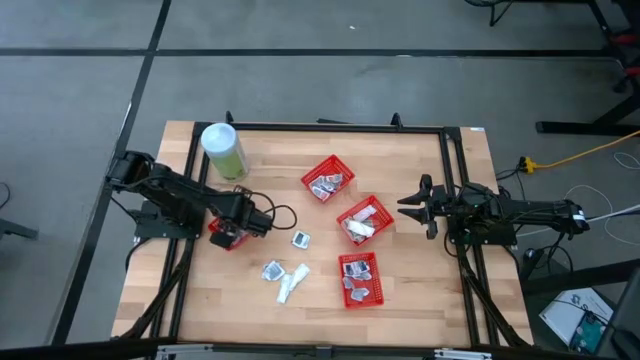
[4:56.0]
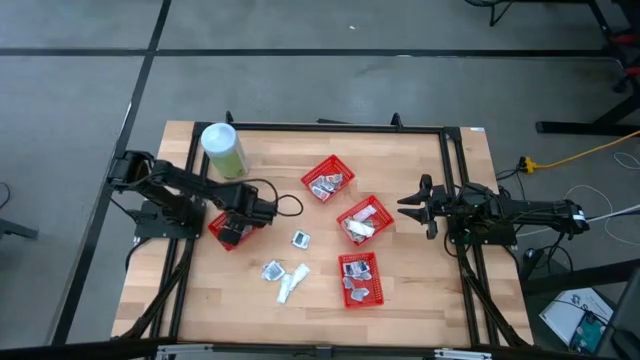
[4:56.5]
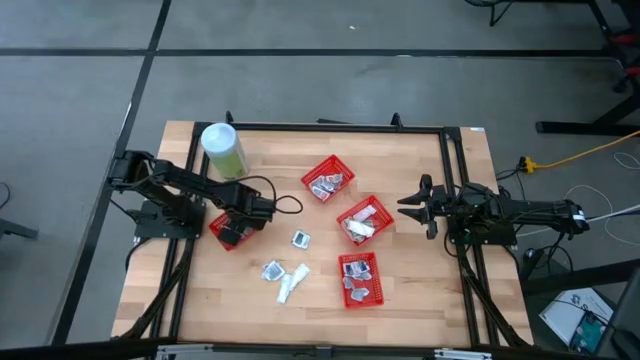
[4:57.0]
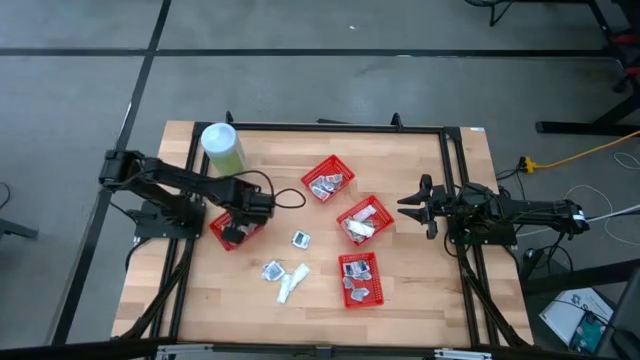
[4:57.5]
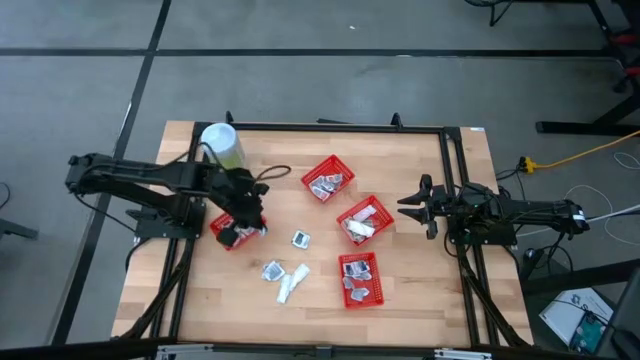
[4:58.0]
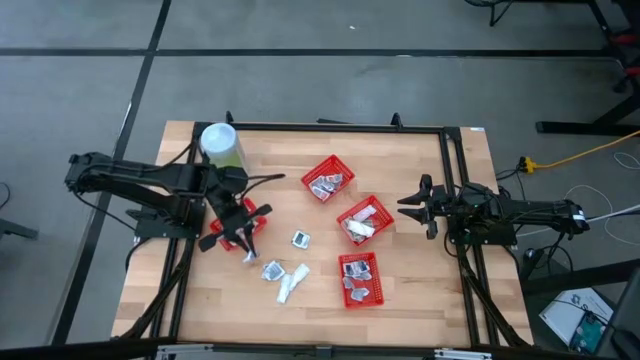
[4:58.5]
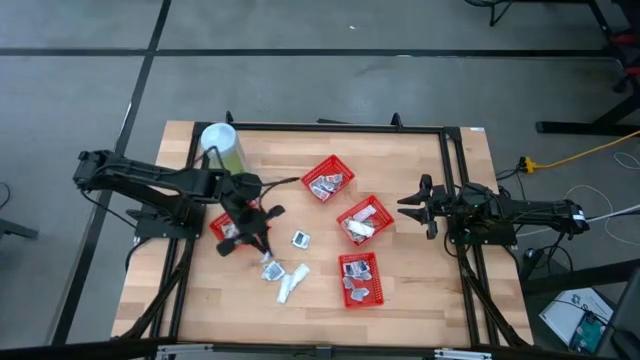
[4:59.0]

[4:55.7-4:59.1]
Task: Pick & Place First Aid Supplies
Remove the blue alcohol pad from the red container

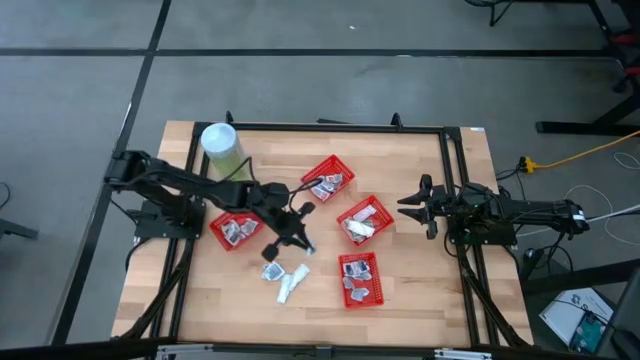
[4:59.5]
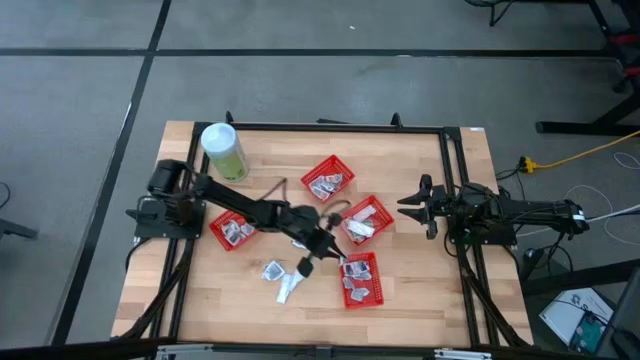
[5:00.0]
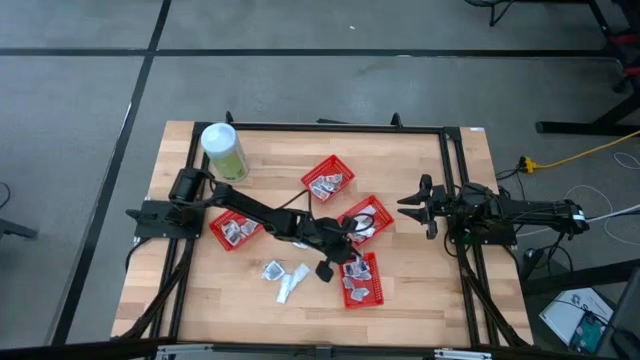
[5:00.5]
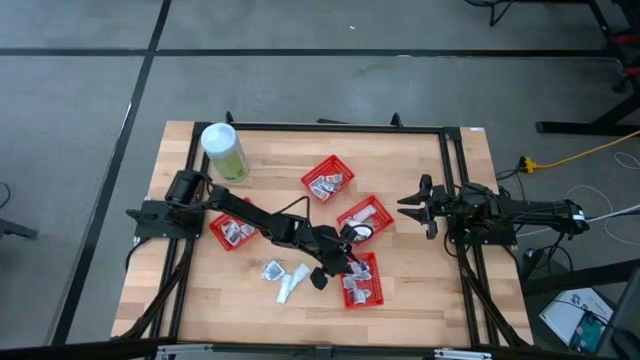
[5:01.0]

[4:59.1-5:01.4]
Put the blue alcohol pad into the red container

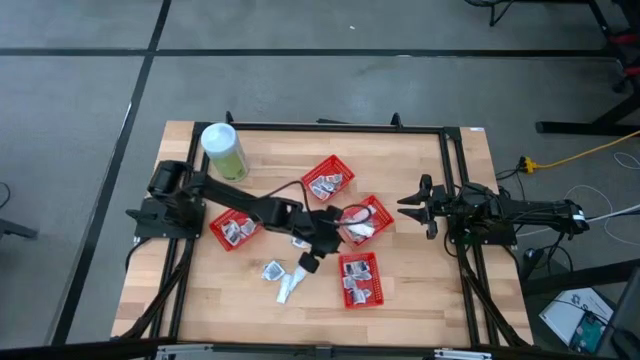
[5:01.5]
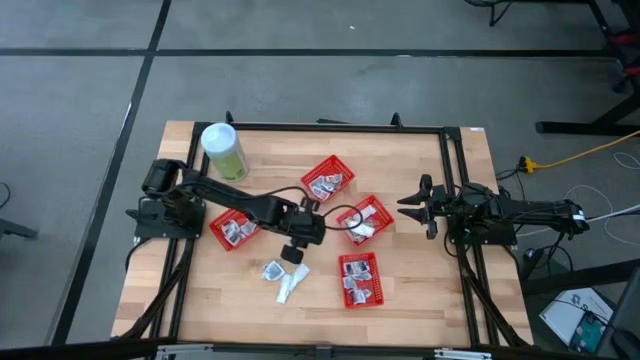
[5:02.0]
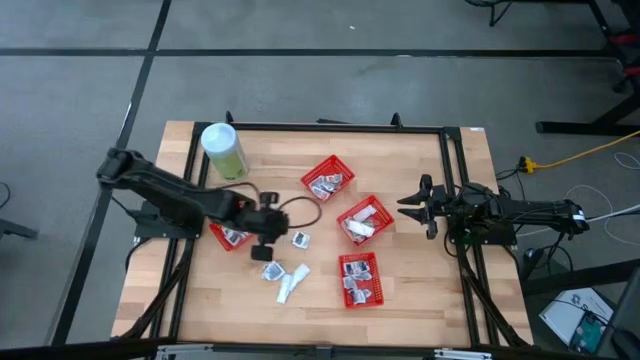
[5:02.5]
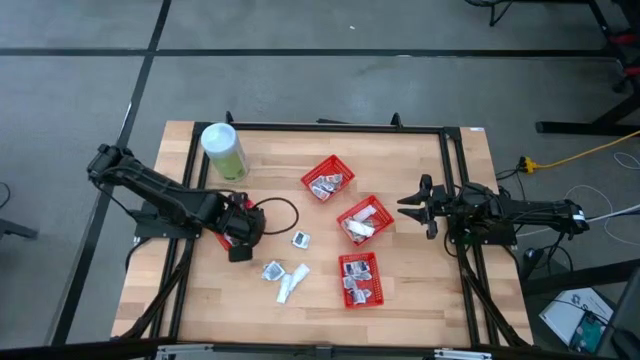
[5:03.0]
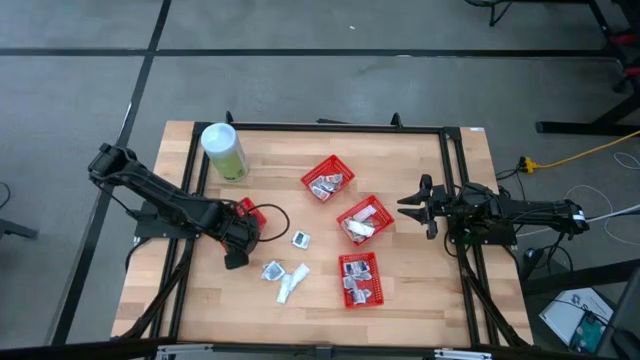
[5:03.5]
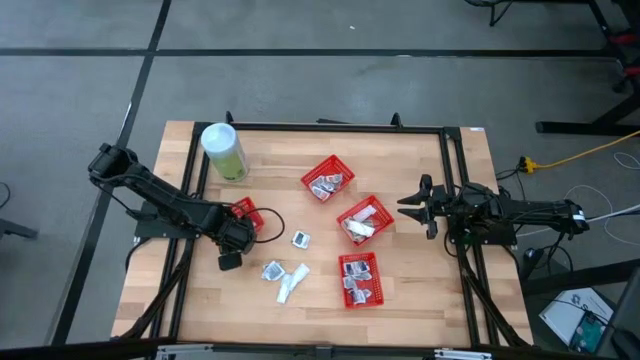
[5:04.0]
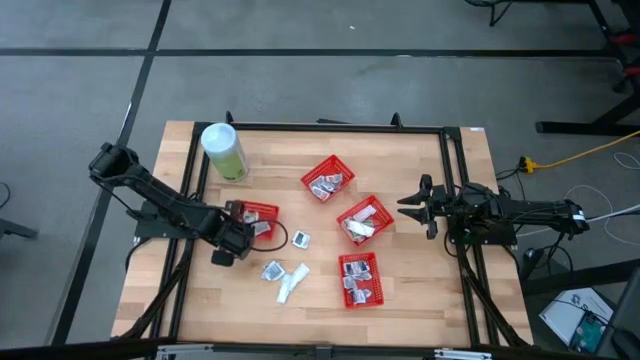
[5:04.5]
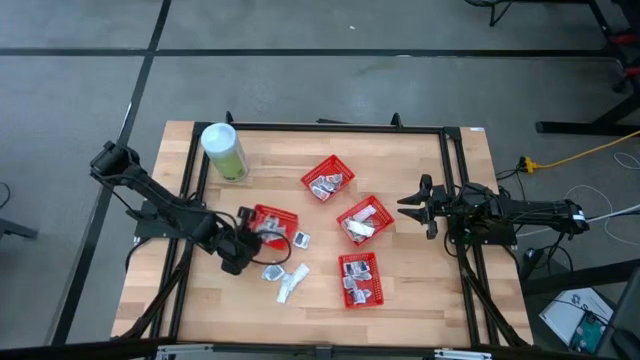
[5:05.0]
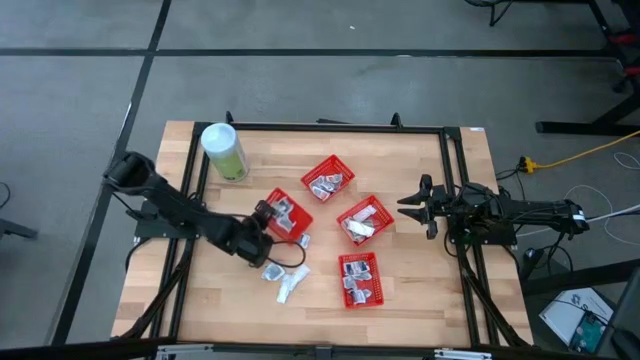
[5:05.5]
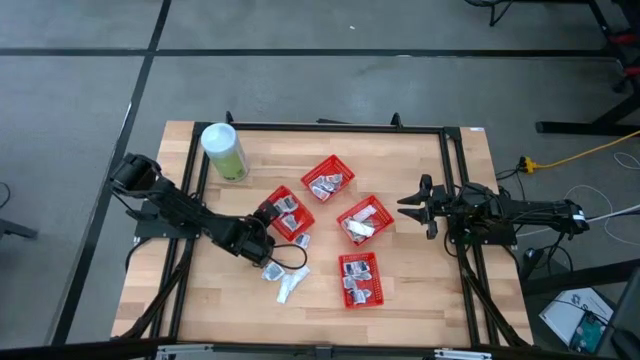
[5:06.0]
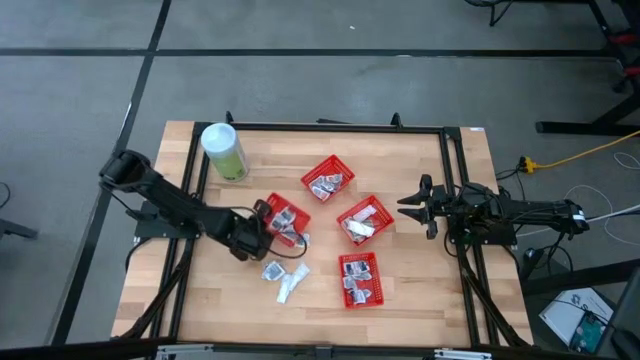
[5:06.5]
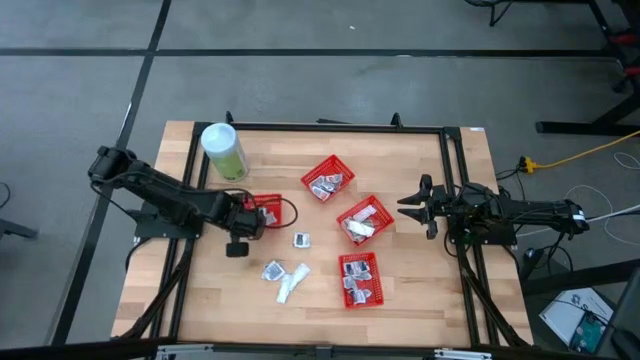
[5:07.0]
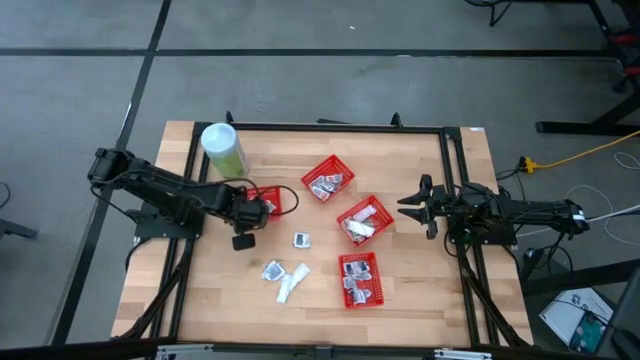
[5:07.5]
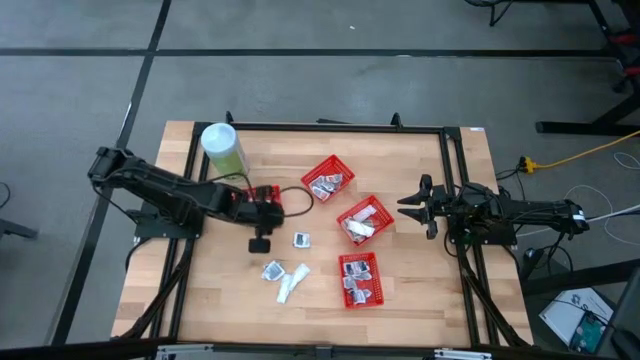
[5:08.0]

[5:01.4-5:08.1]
Adjust the red container

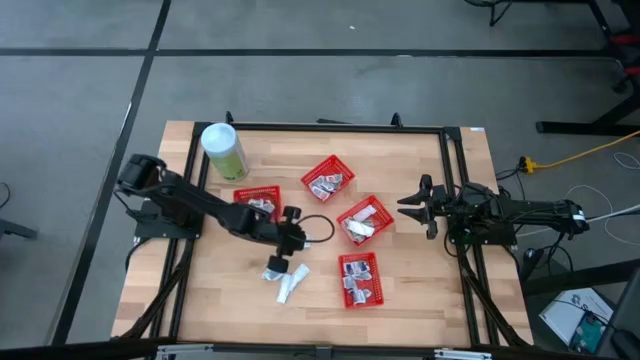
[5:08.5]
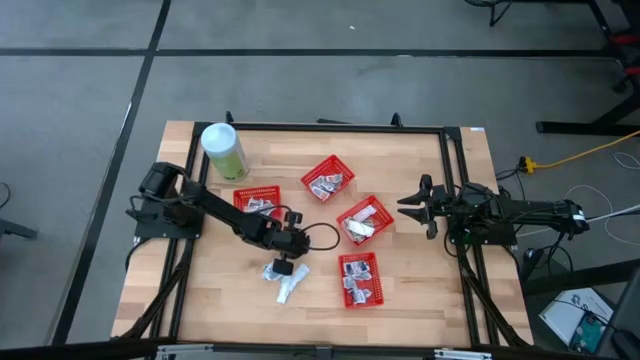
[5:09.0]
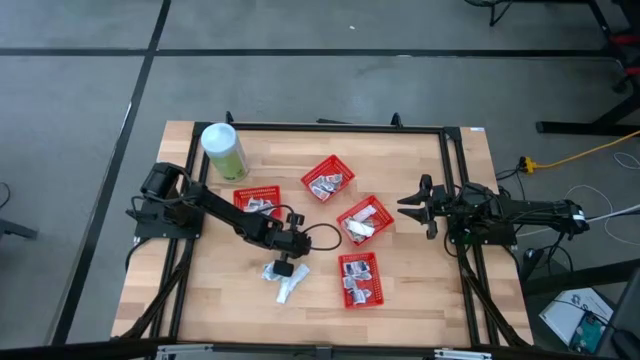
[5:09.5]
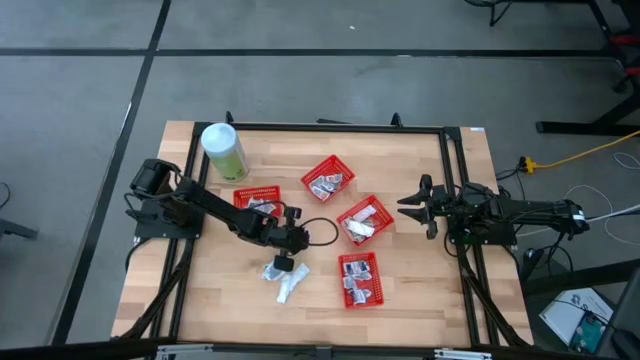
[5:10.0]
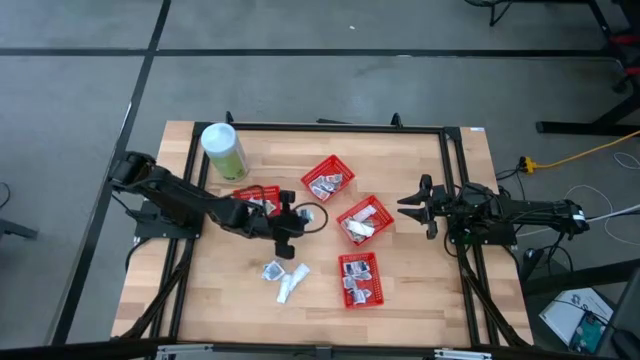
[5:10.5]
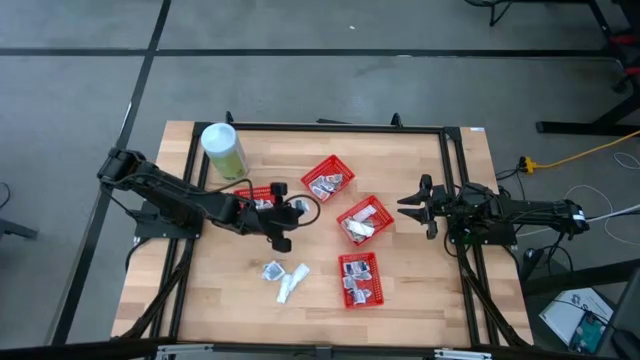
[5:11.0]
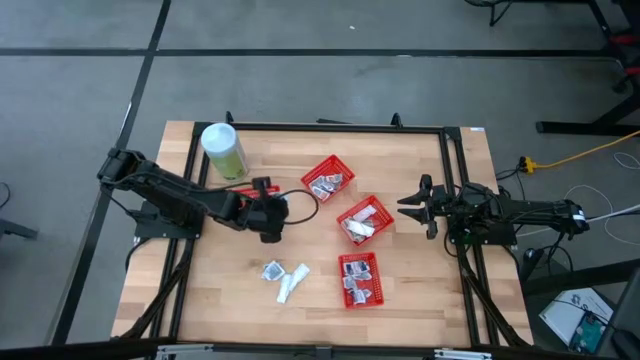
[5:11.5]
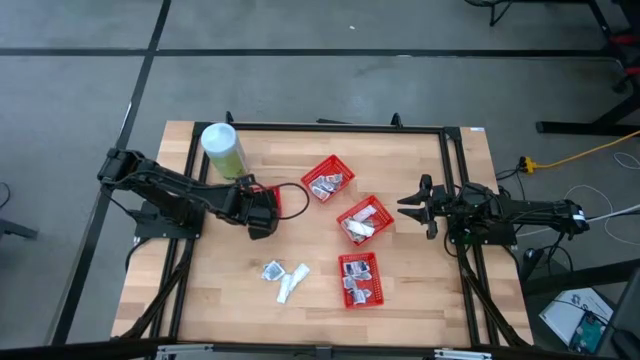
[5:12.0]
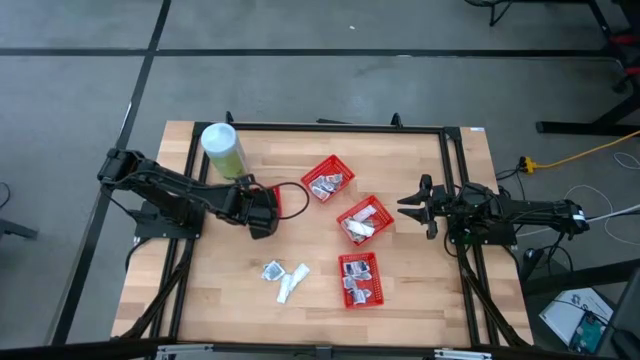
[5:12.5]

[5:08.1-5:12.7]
Put the gray towelette pack into the red container

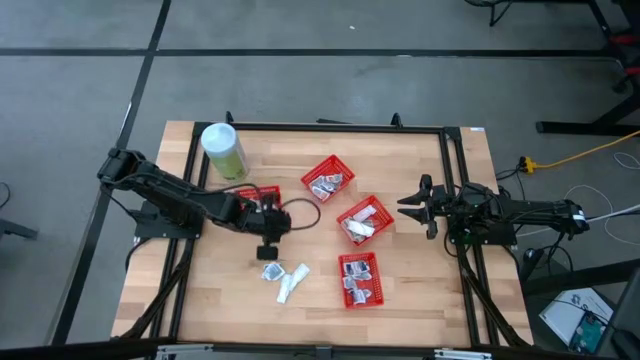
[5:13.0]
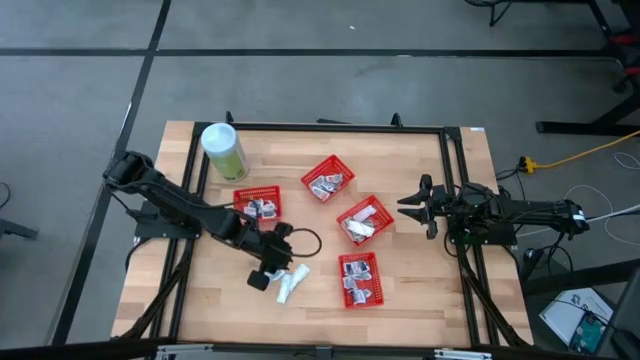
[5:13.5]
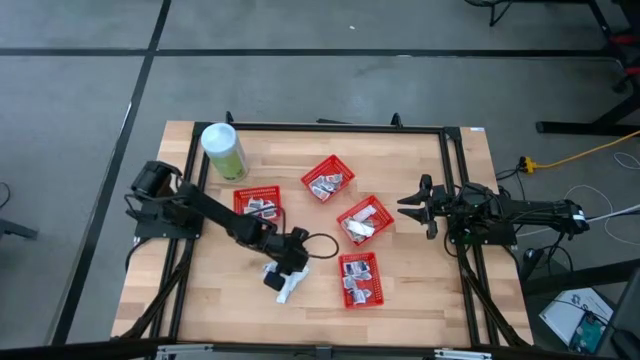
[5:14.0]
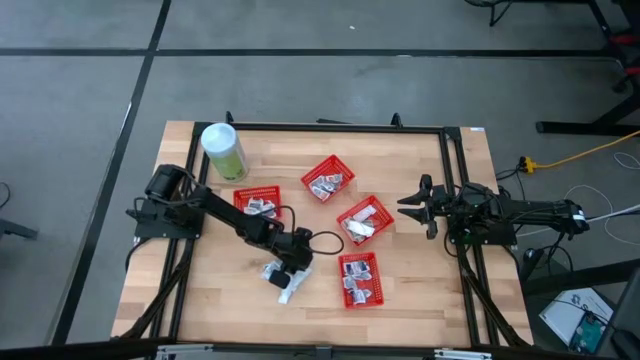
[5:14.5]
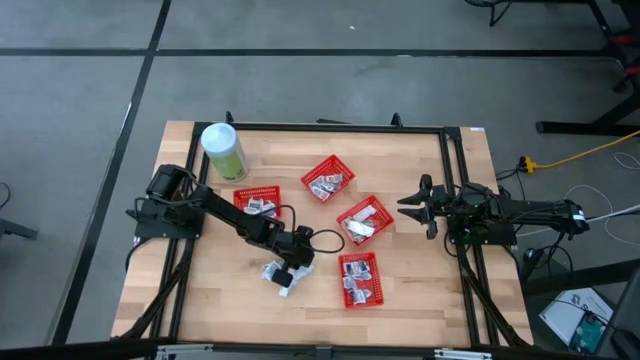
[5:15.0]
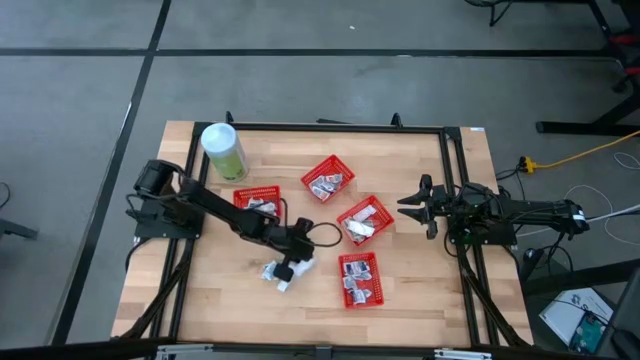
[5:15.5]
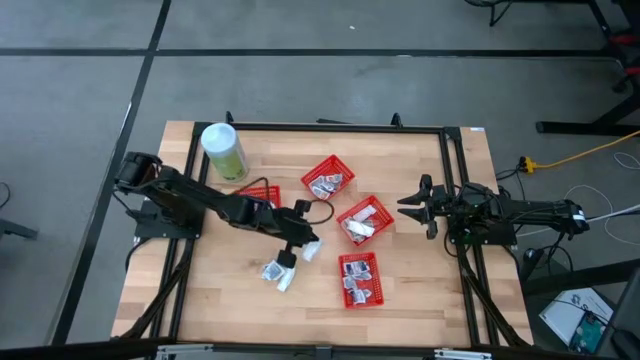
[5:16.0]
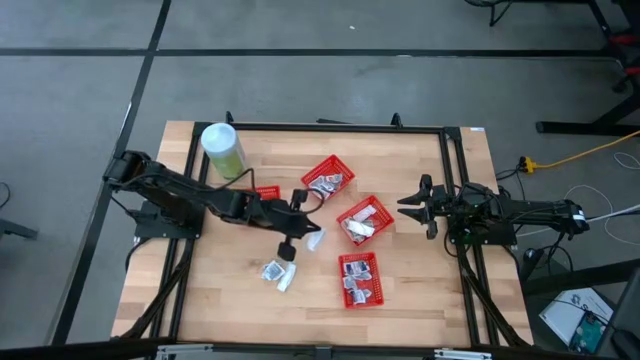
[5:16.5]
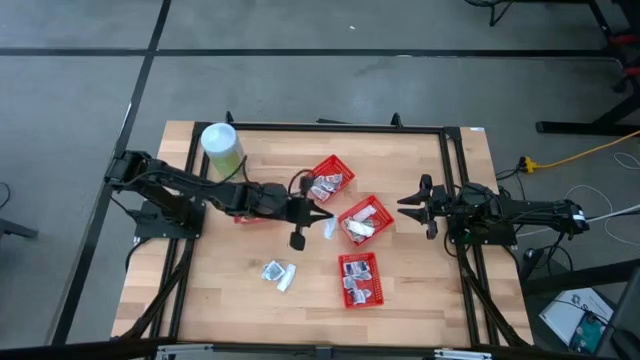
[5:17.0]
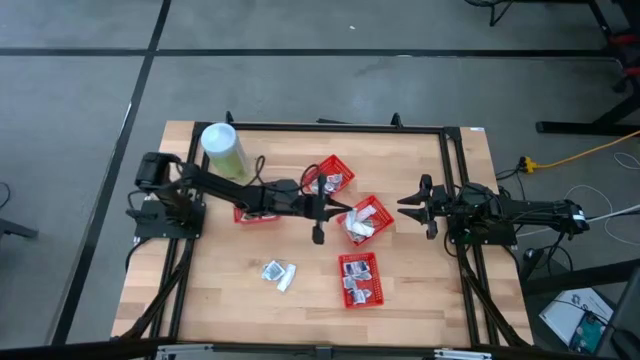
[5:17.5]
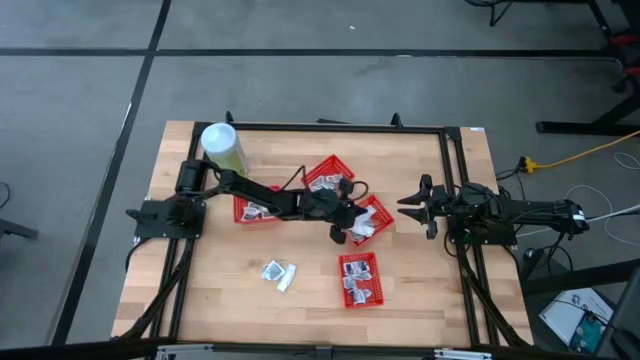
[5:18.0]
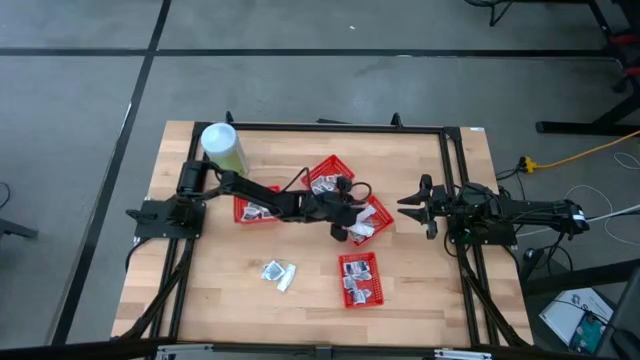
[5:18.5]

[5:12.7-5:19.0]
Put the green bandage into the red container
